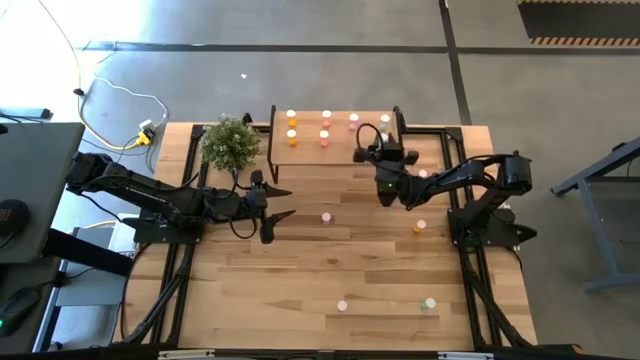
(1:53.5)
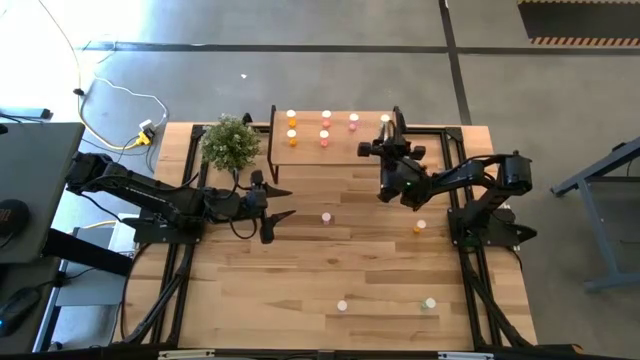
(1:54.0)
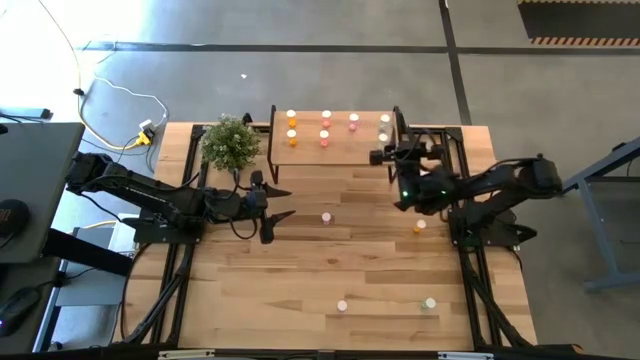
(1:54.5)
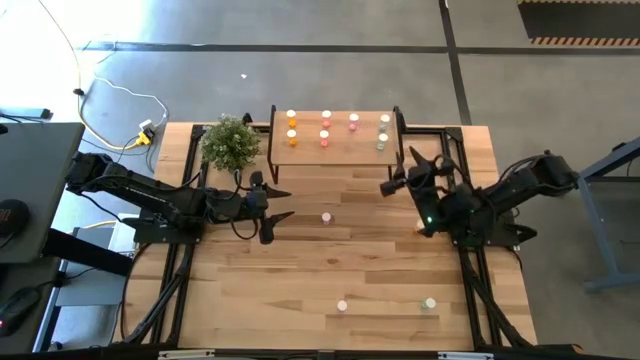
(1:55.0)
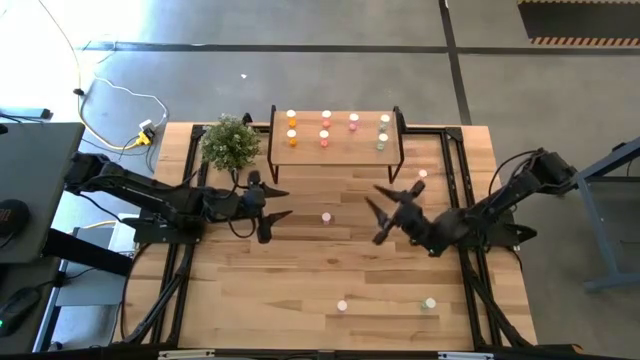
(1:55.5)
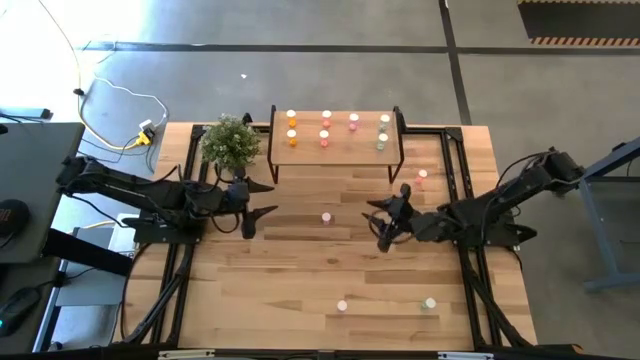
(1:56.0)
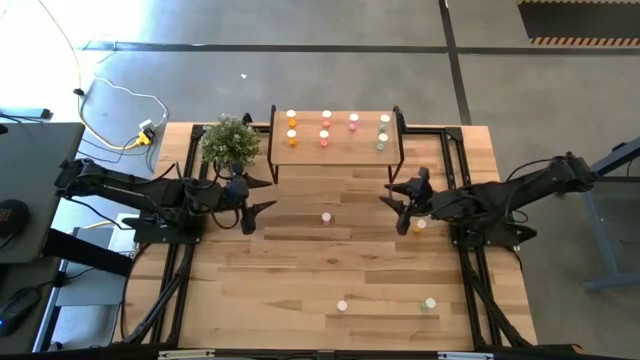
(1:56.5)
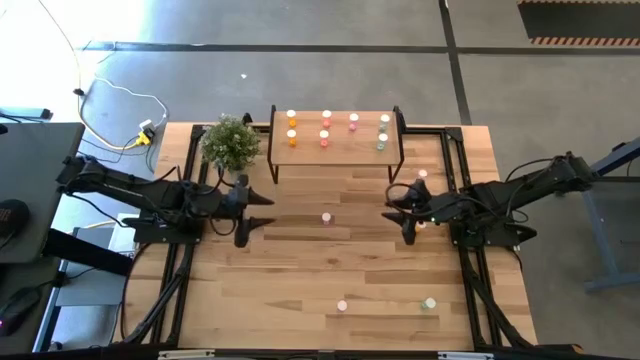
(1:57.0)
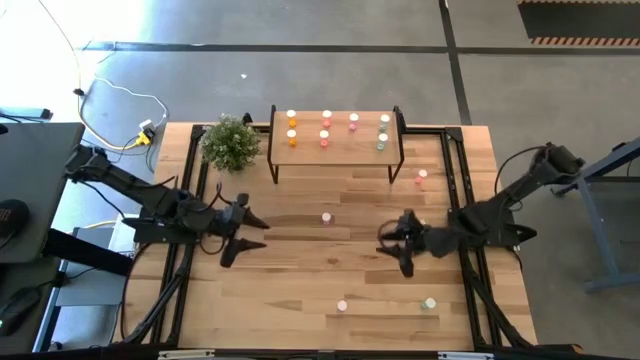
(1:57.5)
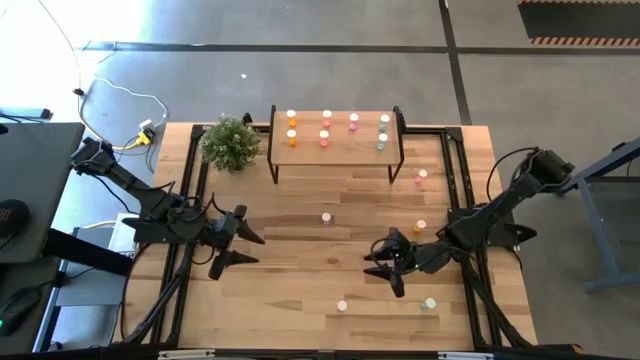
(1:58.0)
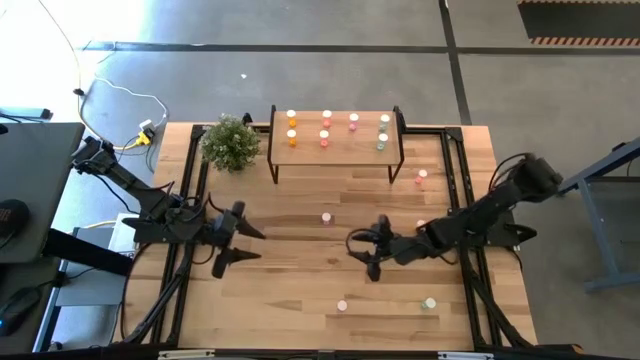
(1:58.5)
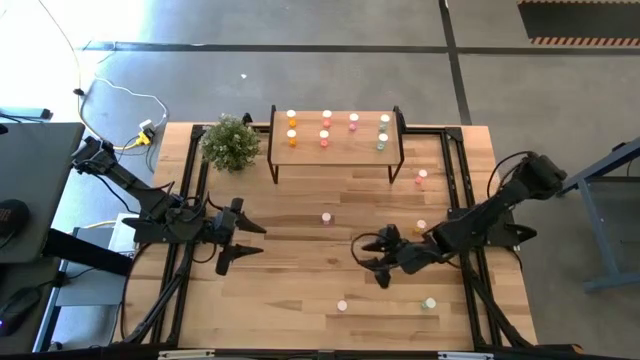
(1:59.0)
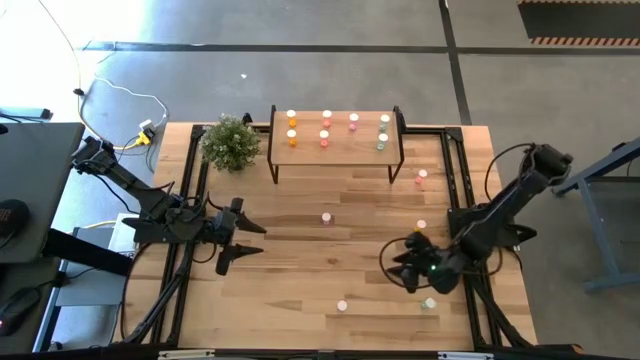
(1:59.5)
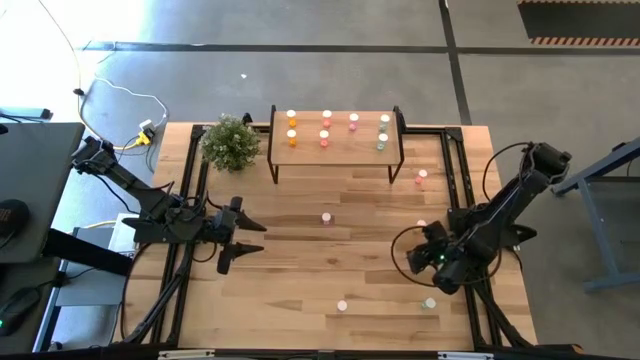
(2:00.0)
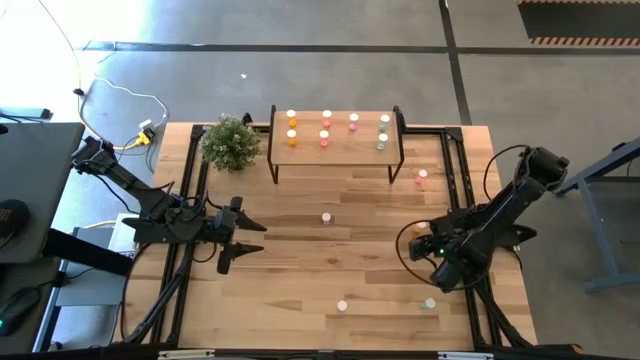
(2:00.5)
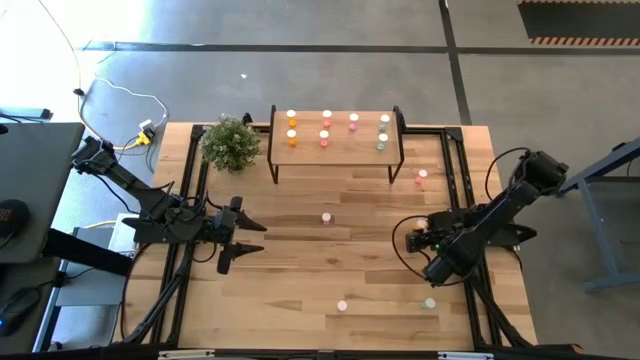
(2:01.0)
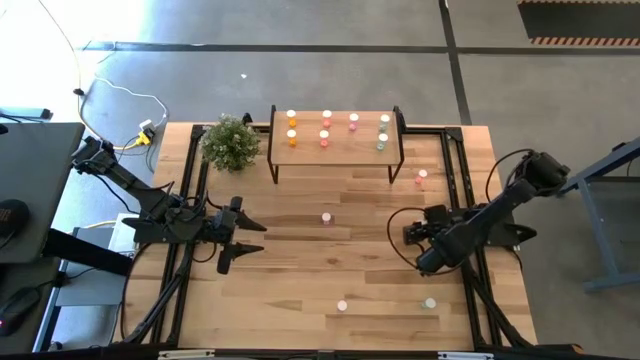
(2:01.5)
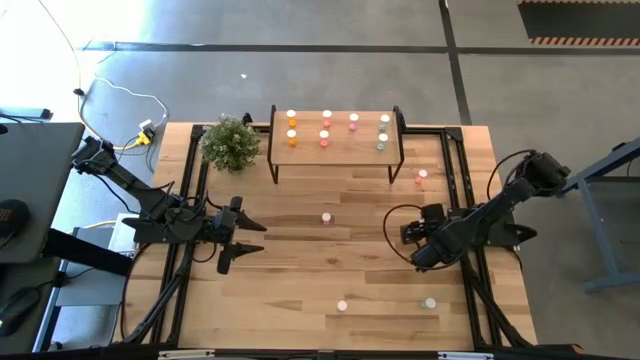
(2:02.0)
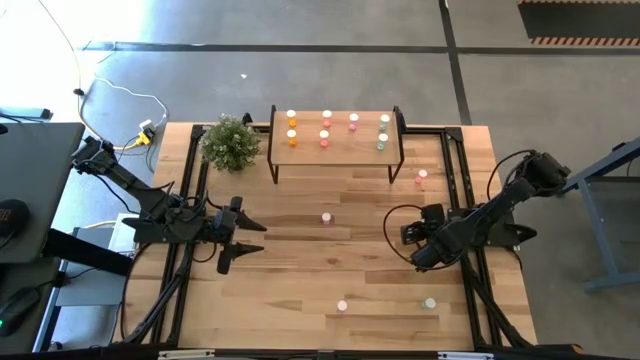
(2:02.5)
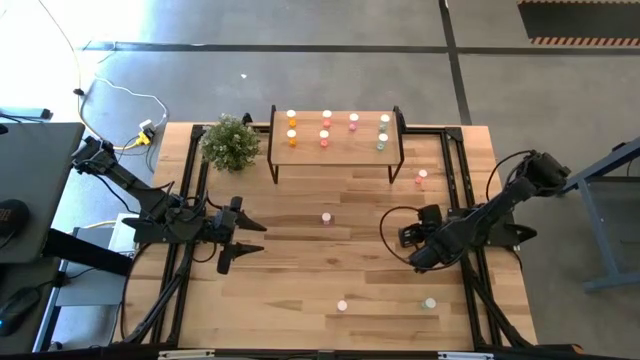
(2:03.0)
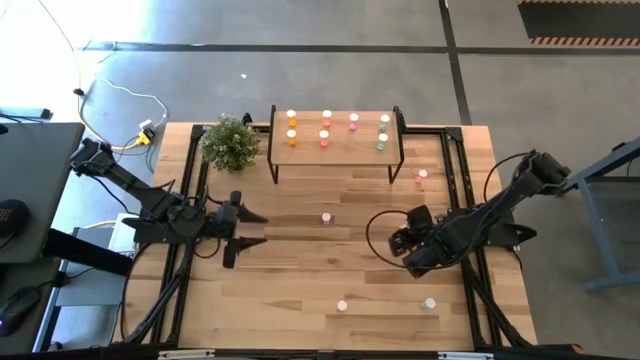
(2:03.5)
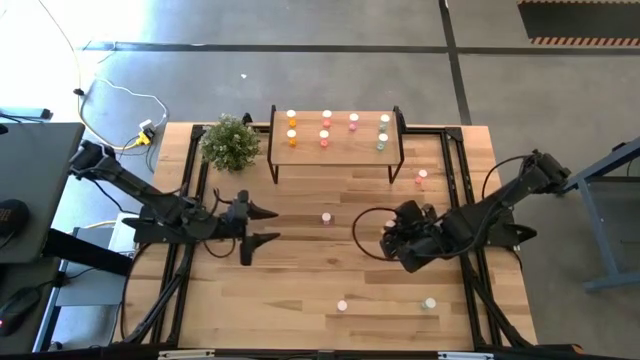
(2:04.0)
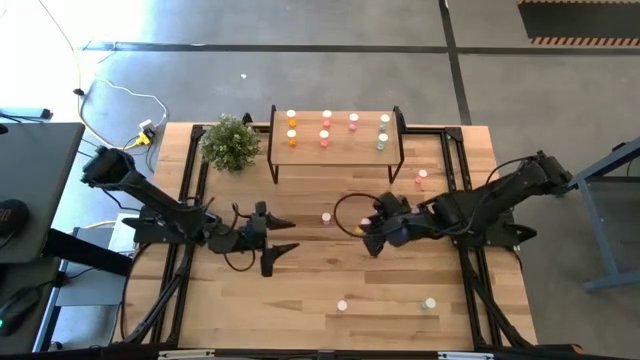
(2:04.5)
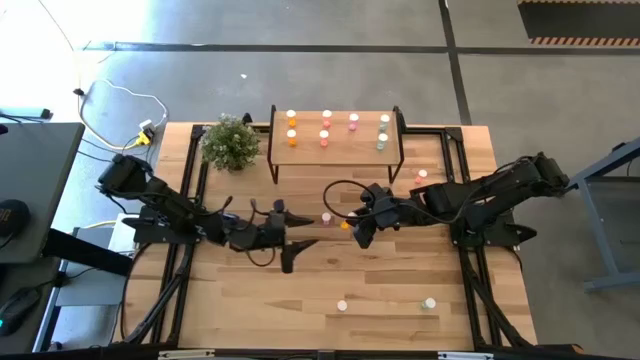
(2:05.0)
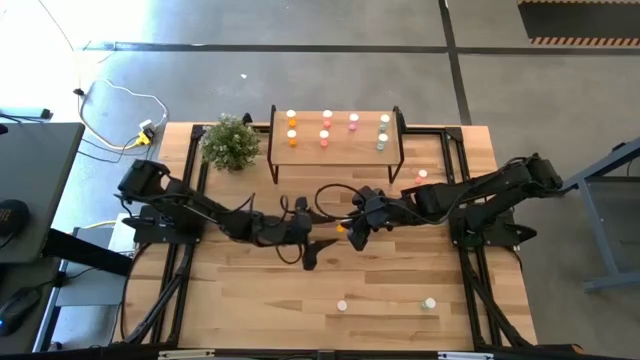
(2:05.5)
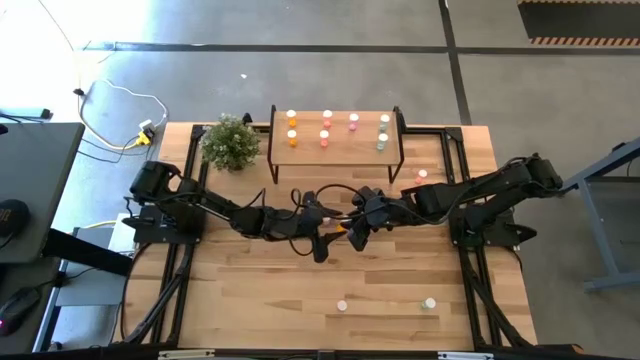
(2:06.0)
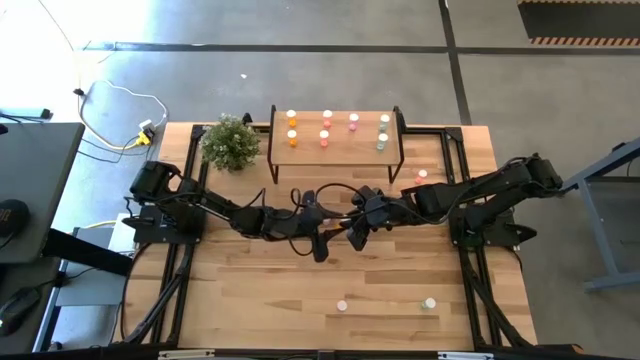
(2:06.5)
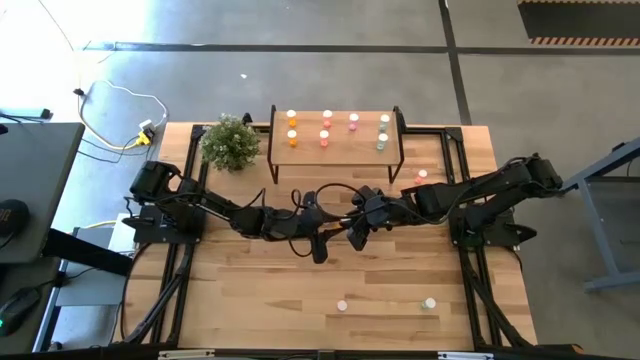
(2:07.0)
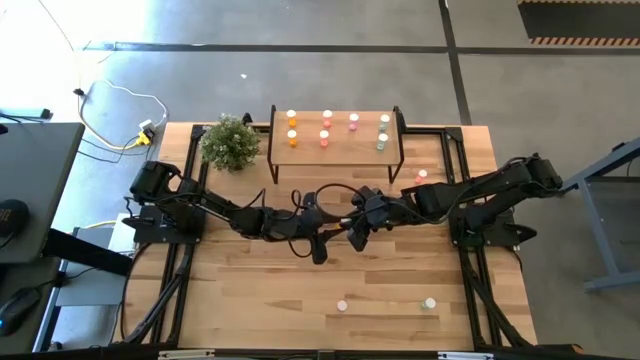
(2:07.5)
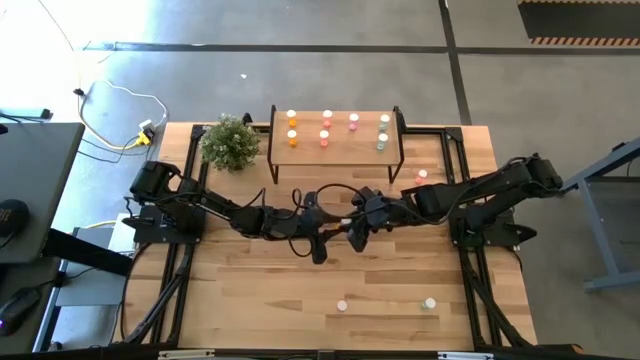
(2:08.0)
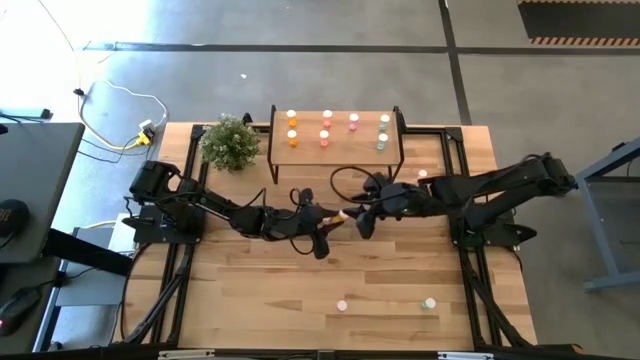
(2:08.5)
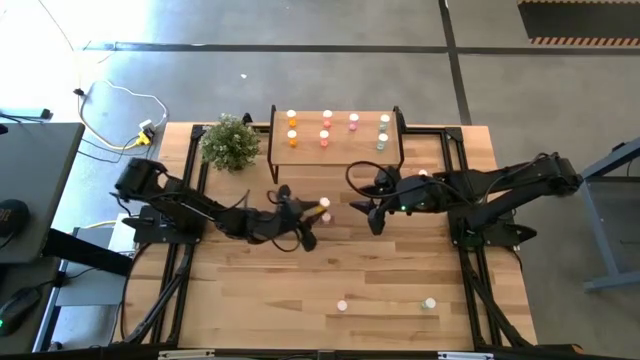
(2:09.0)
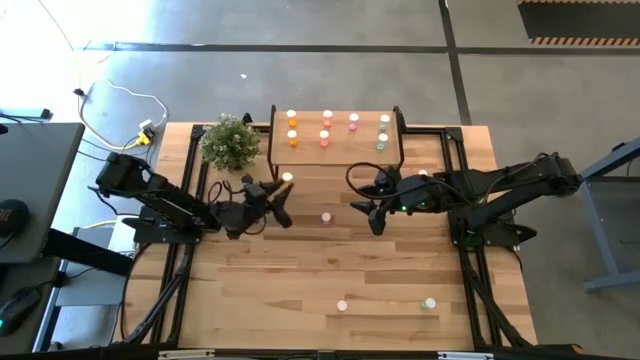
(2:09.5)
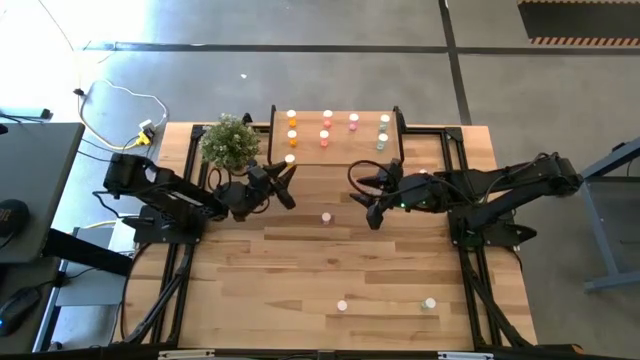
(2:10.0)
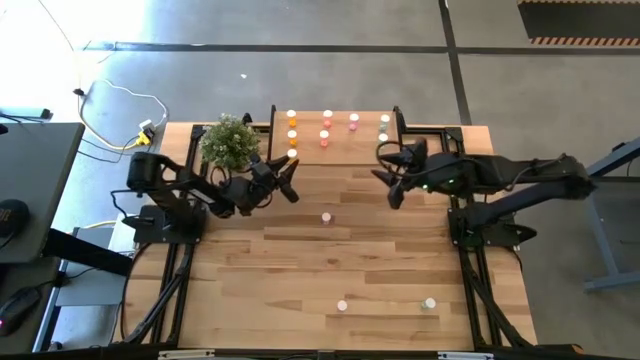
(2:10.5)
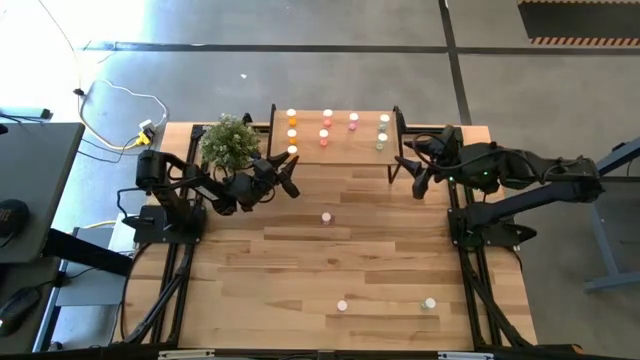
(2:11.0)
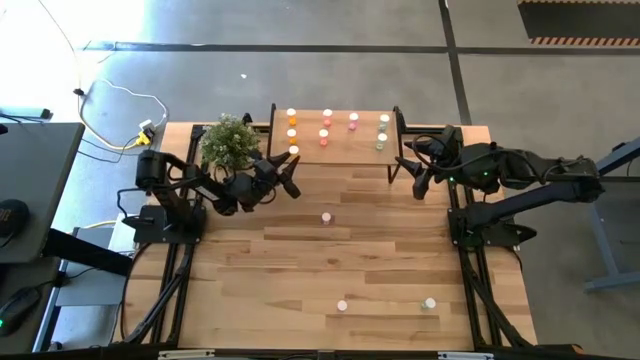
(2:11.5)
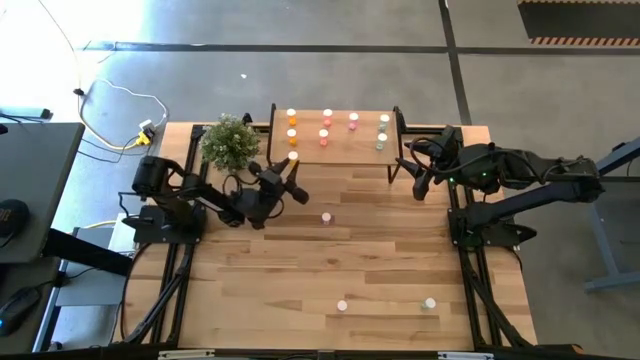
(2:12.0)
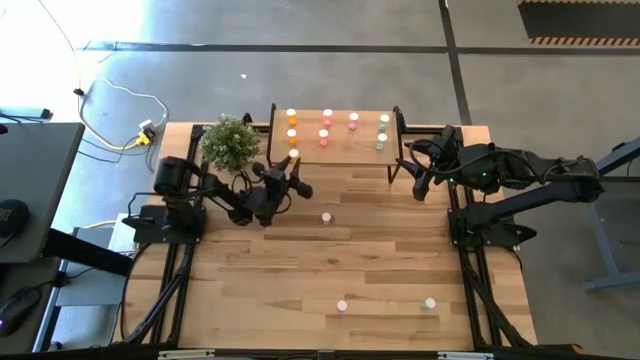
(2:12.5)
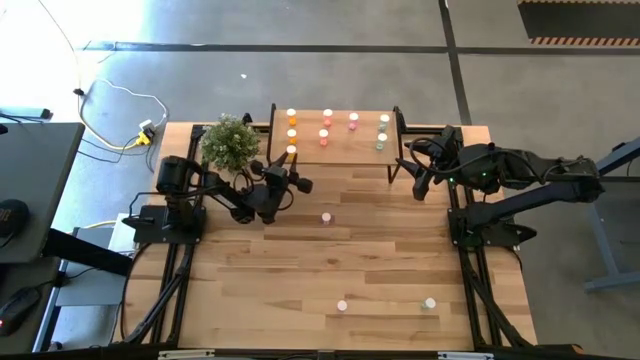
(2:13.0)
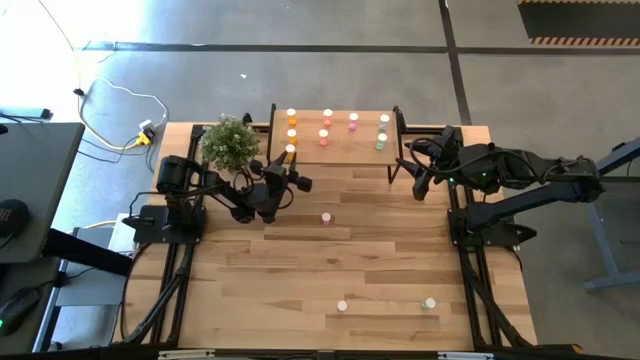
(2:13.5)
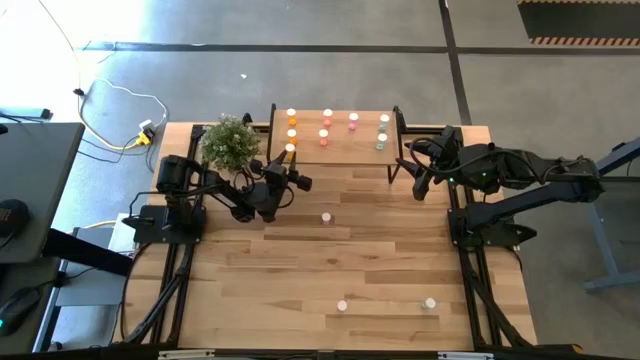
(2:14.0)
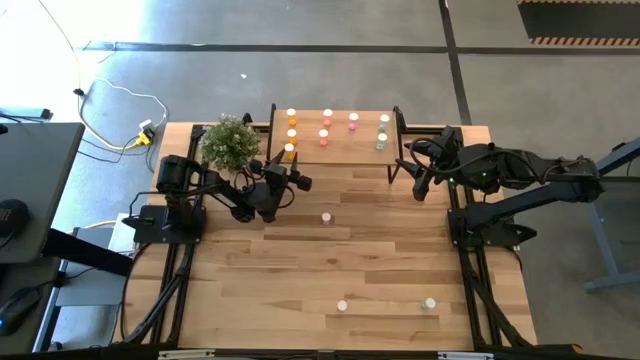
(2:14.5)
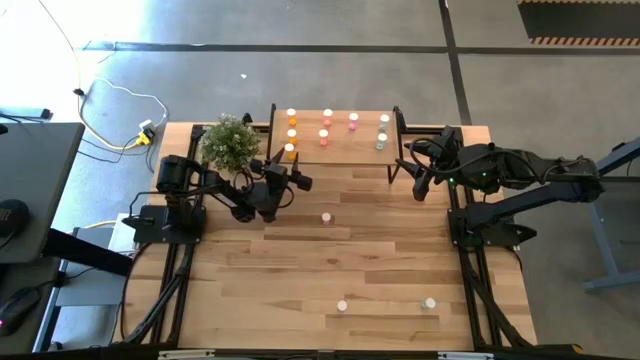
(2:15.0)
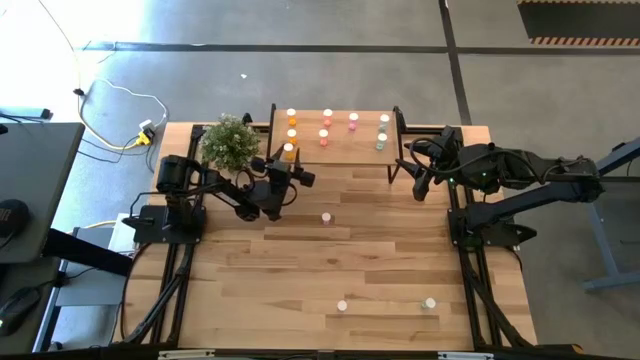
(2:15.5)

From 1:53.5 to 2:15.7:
Task: Pick and place medicine bottles onto shelf by color
Put the orange pill bottle aligned with the other orange pill bottles on the shelf
